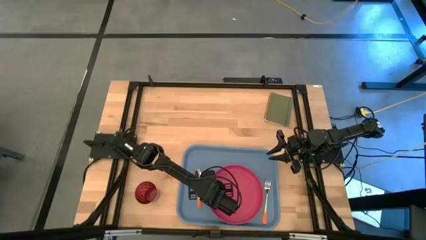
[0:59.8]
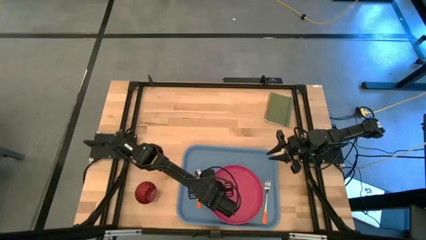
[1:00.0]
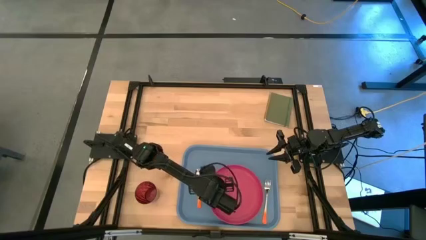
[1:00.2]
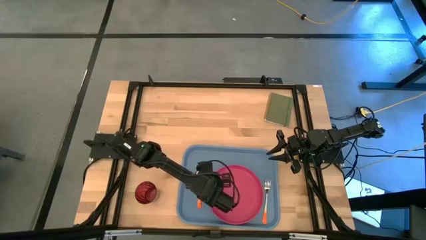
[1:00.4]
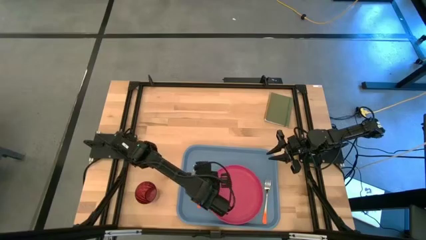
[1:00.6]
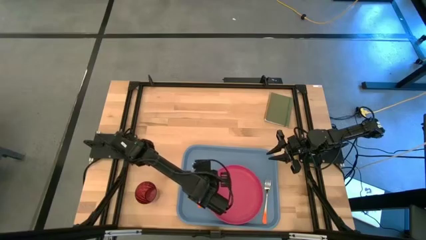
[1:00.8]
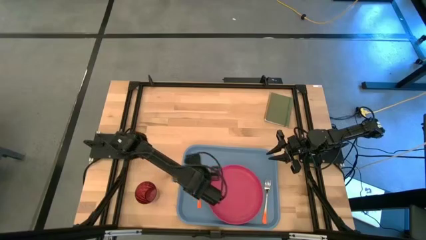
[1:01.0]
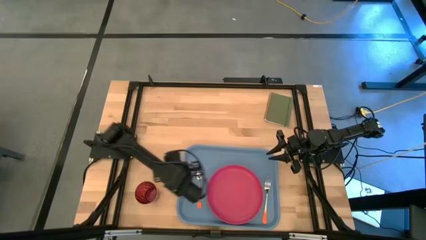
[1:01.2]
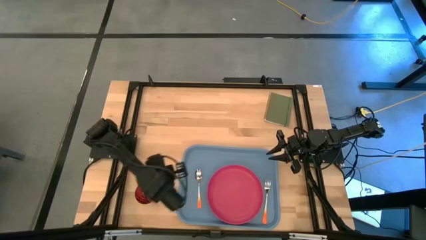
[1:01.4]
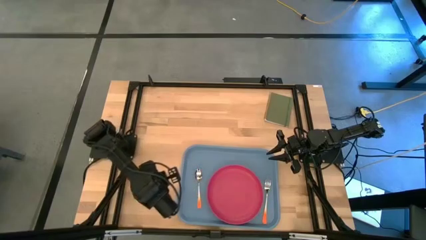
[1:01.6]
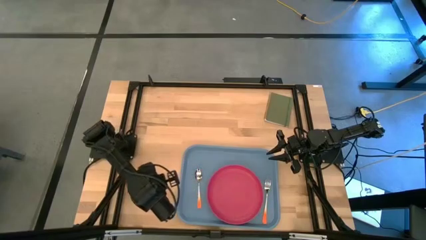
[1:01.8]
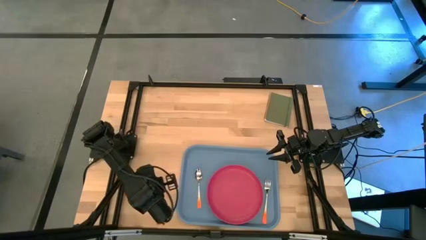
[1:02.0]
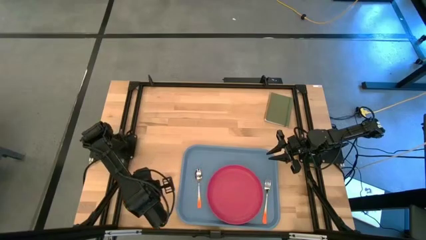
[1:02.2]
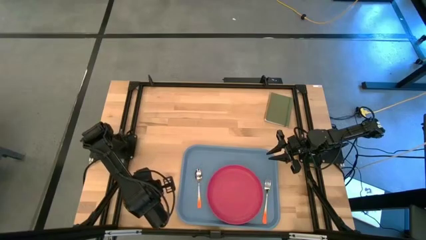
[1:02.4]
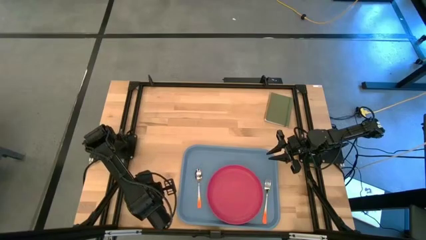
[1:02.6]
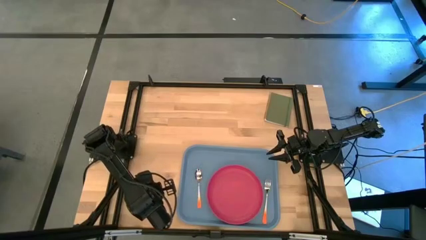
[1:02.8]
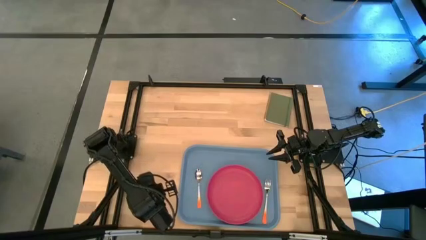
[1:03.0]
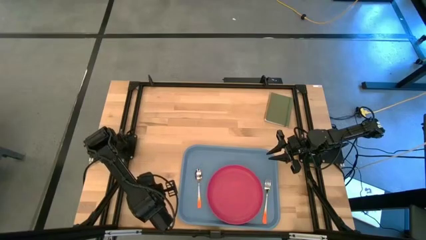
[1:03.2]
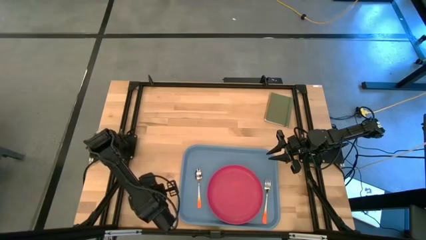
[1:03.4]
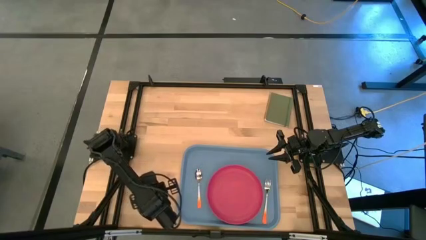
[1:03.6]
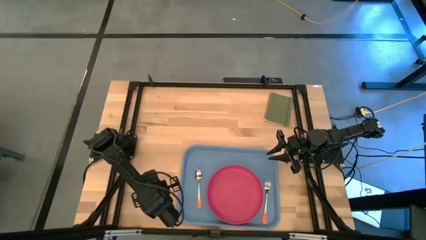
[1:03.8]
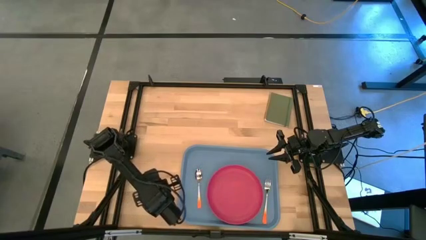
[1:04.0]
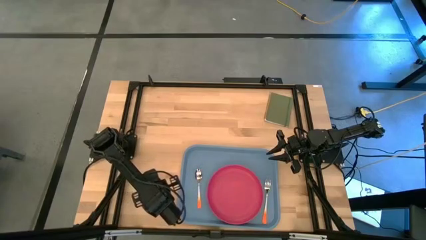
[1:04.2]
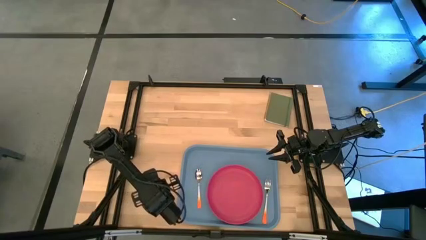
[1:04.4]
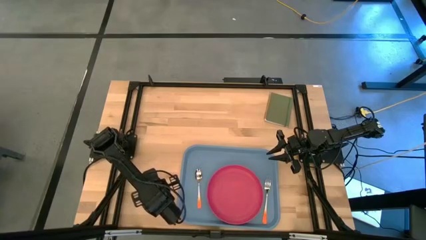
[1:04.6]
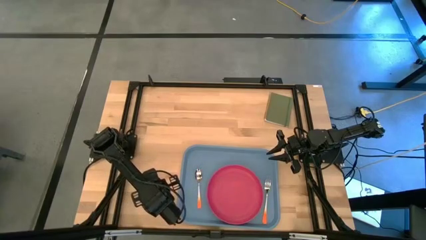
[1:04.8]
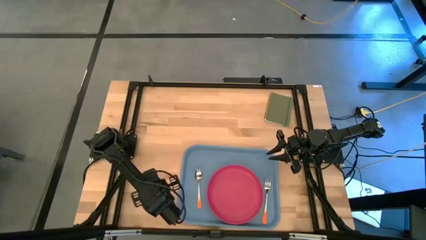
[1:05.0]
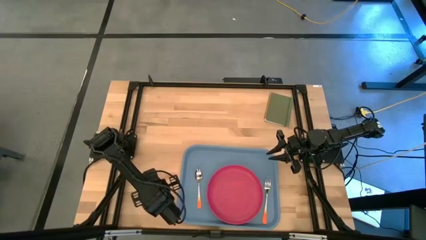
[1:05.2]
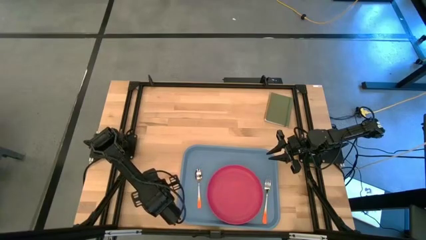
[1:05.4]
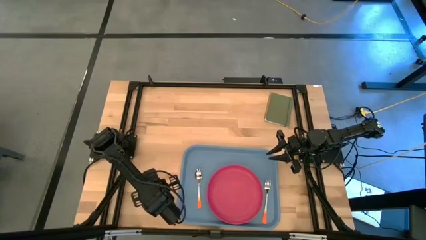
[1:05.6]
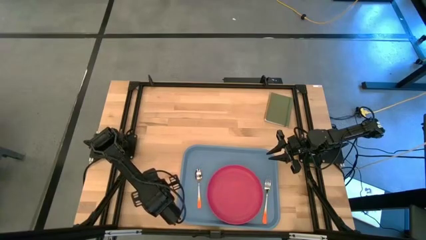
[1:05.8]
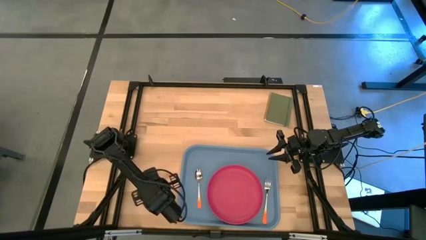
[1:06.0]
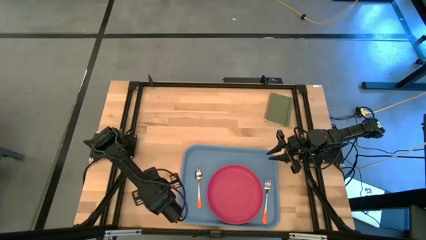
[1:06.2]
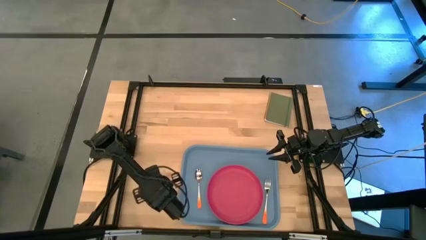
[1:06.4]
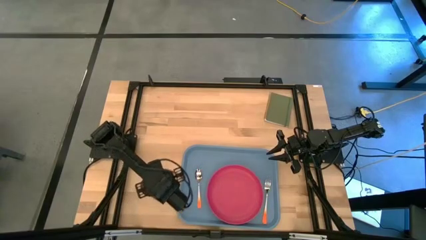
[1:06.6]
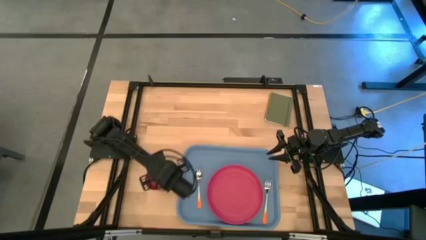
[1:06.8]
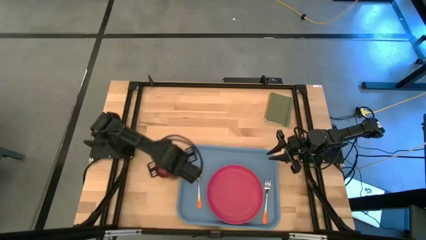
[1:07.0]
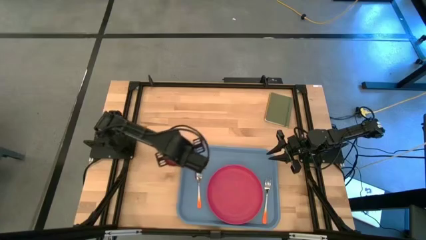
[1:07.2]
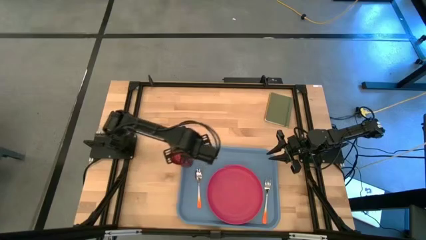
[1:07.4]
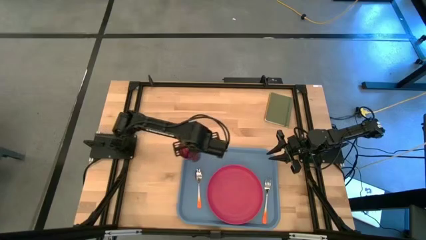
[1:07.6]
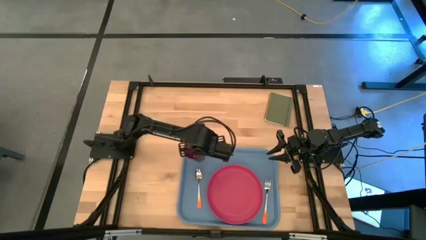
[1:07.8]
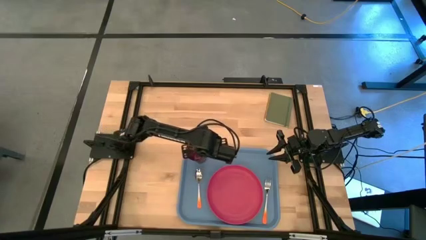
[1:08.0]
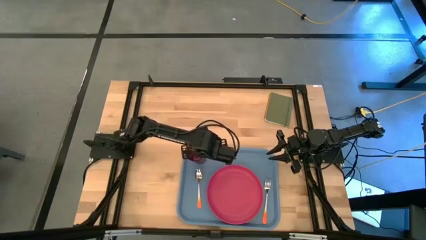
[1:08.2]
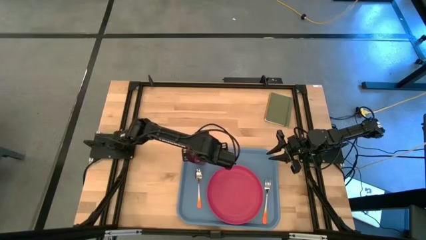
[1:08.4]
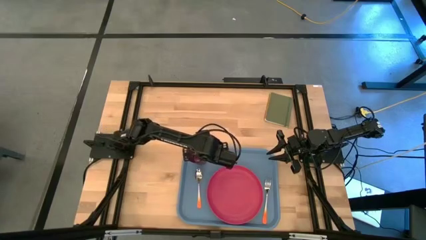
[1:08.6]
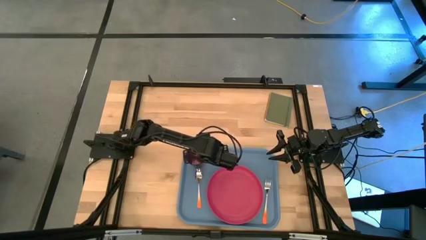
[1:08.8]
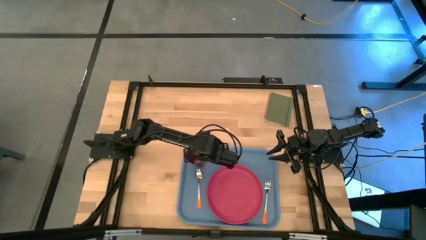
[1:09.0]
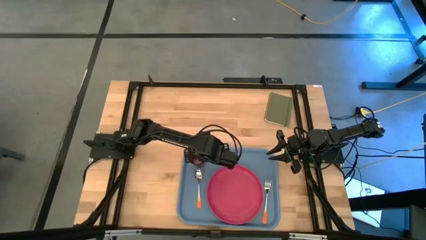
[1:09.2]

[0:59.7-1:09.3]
Task: Pick and place plate/cup/fork/spoon on tray
Put the red cup to the top of the orange spoon on the blue serving tray

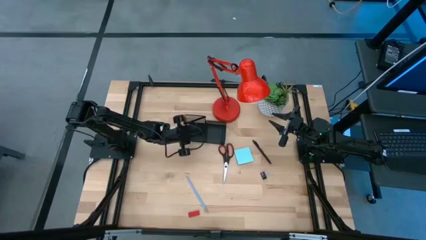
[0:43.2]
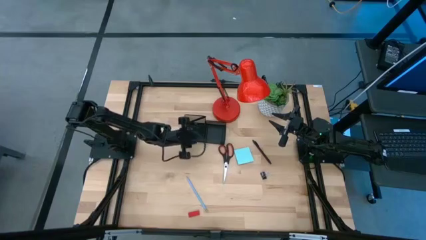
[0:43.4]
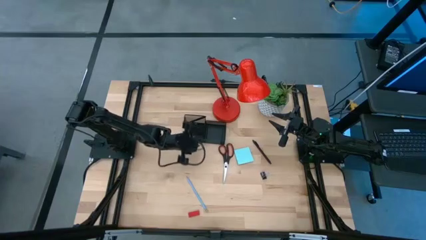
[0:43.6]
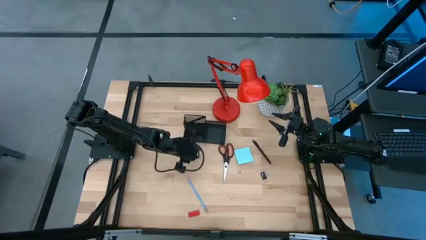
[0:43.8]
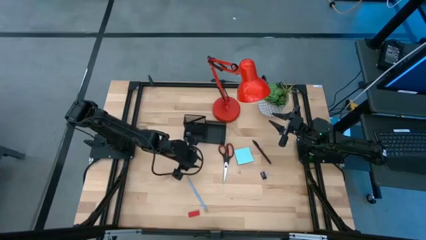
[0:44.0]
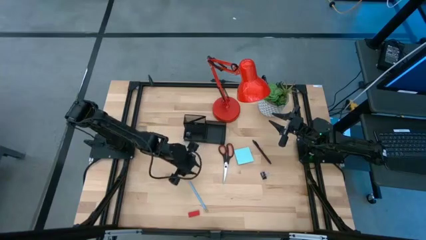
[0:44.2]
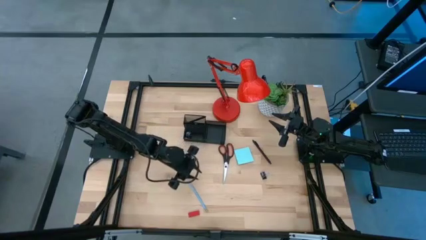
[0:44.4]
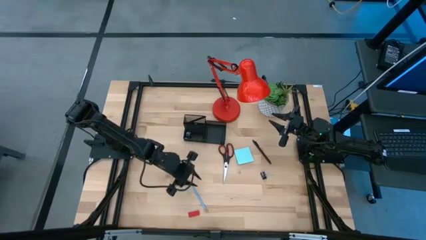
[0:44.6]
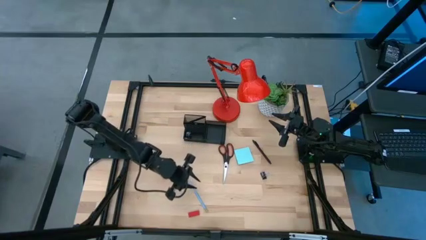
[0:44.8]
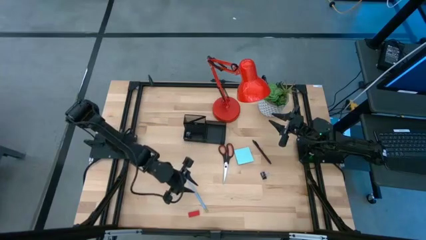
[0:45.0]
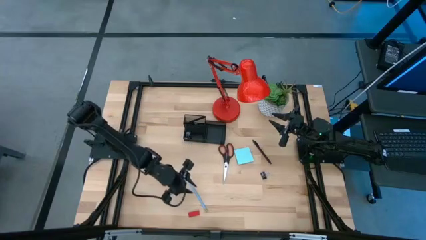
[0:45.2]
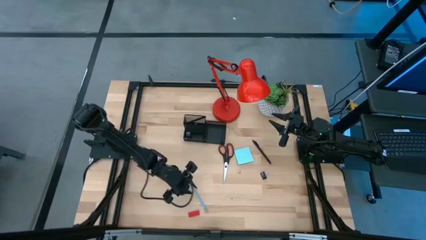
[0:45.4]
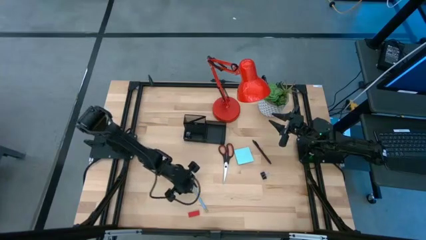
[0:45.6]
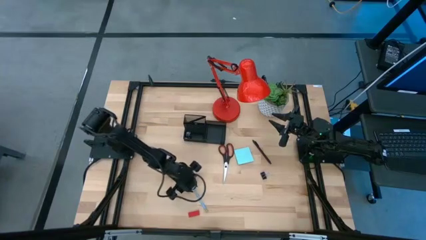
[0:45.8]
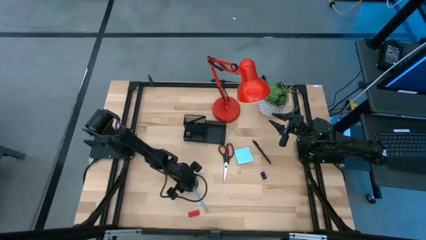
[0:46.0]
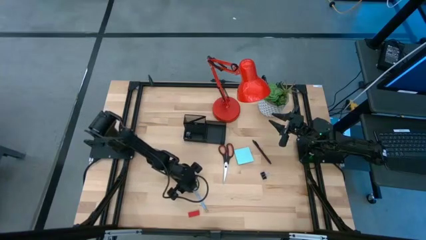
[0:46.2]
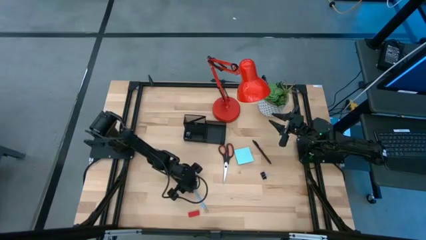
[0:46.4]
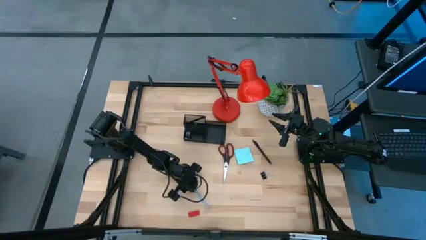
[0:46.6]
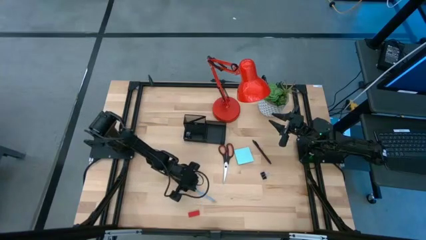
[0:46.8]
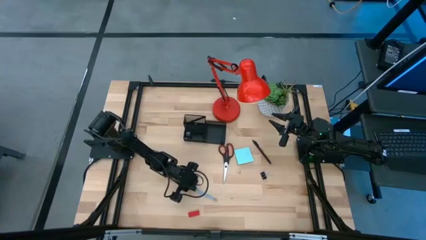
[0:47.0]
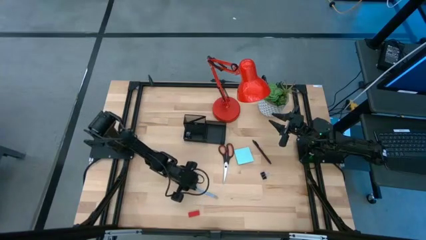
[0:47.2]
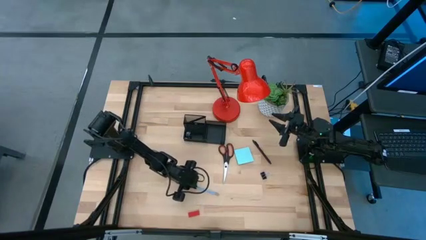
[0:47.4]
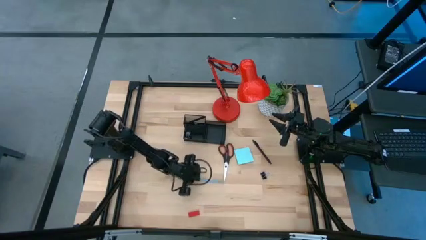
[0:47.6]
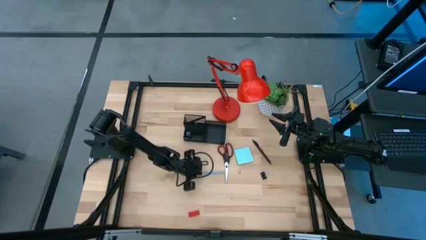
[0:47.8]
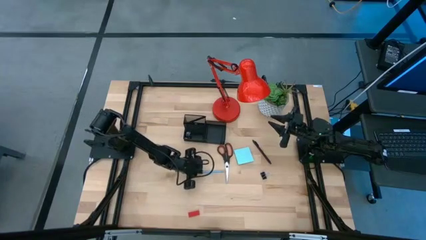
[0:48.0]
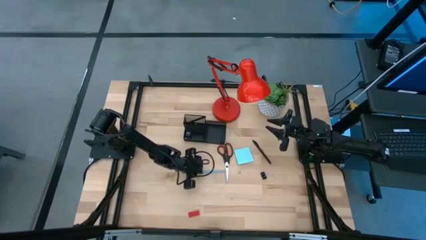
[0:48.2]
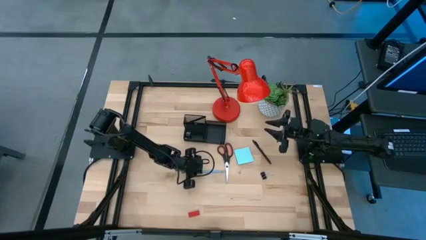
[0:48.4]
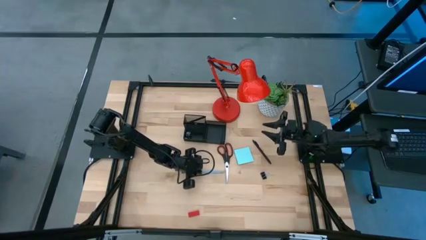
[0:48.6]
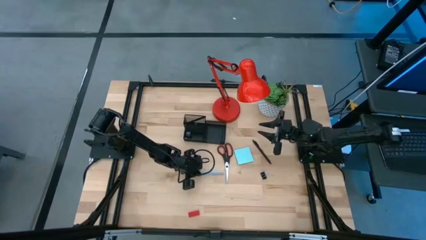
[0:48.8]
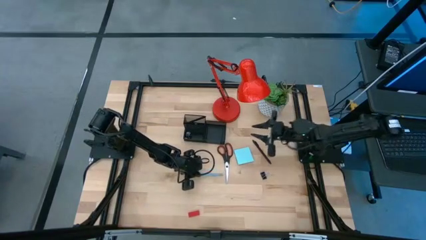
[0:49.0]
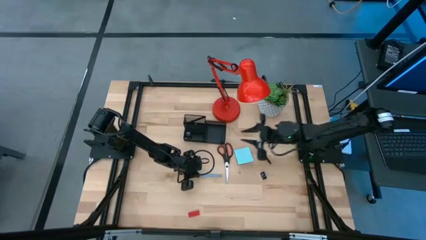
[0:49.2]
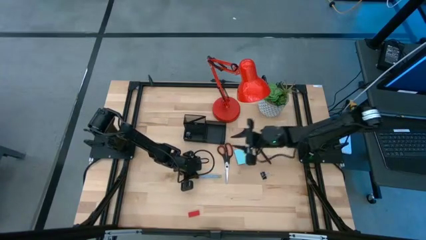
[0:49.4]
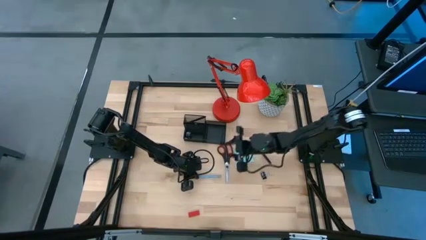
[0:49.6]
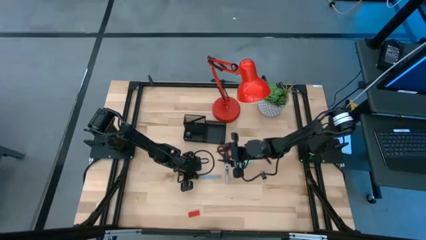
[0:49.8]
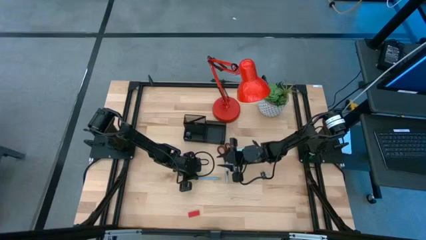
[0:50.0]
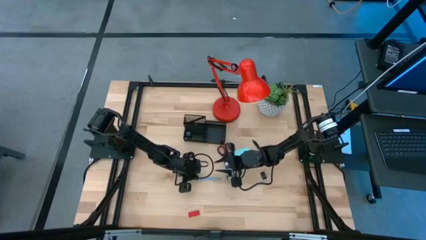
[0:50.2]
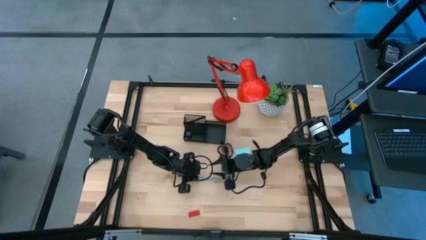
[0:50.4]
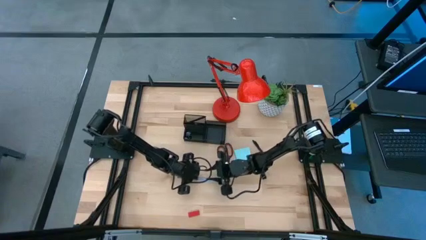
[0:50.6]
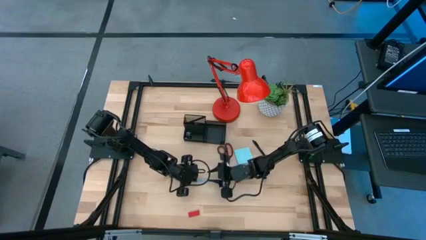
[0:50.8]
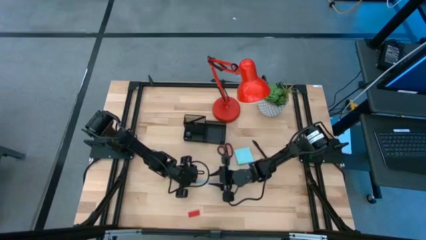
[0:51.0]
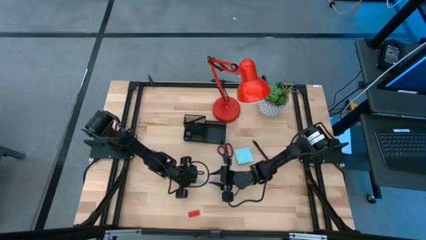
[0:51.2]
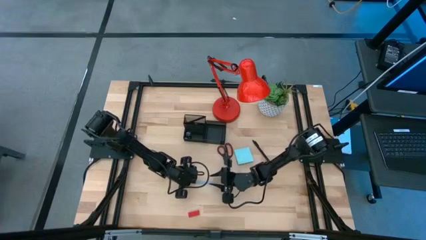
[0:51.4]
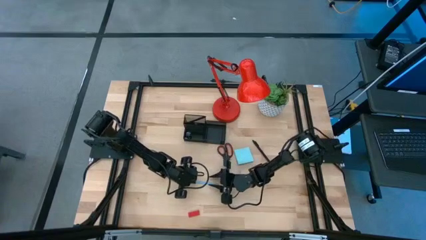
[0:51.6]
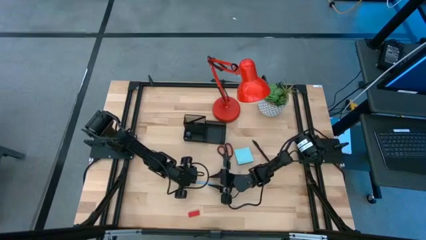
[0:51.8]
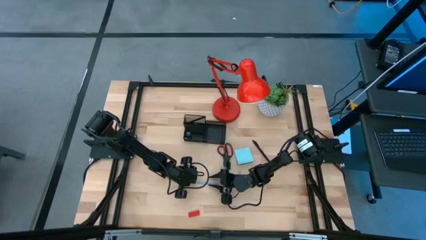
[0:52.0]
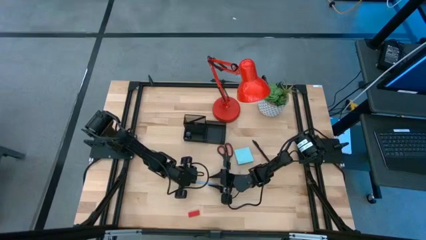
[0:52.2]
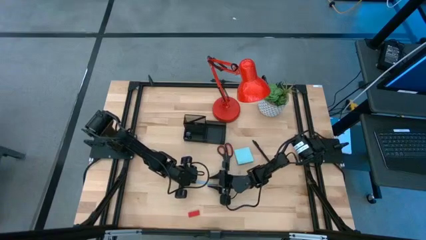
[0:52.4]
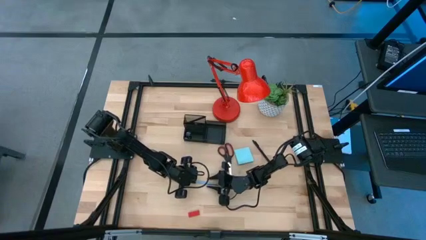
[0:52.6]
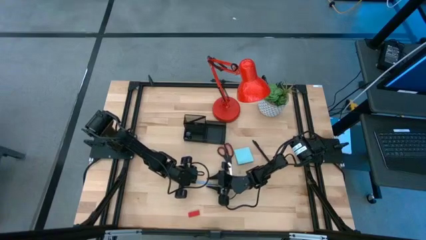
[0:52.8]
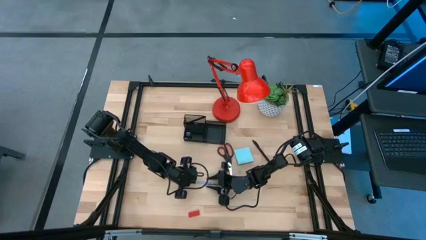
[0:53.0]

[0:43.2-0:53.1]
Task: Pick and place office supplies into organizer
Put the blue pencil into the black desk organizer
